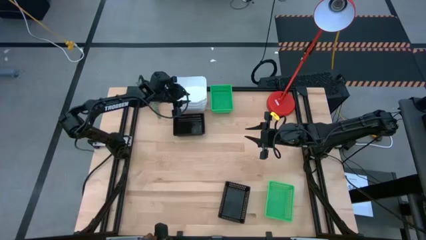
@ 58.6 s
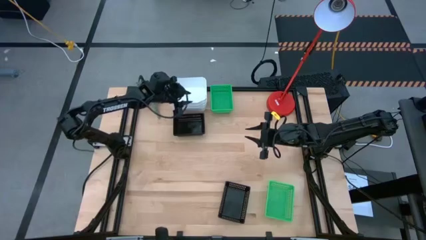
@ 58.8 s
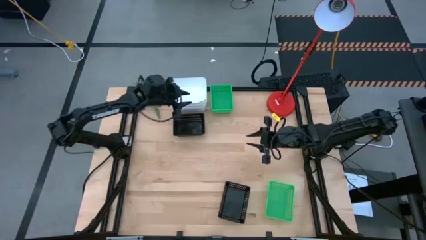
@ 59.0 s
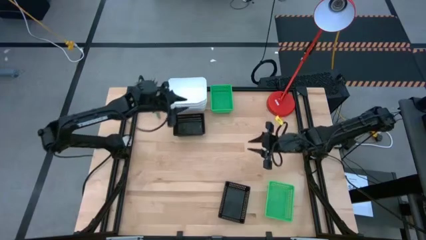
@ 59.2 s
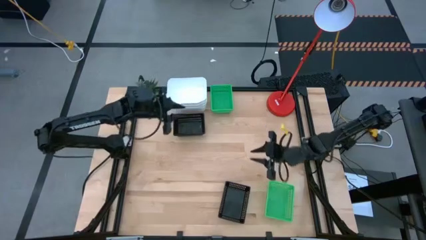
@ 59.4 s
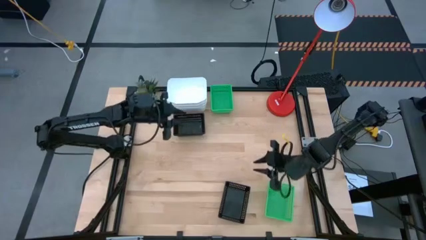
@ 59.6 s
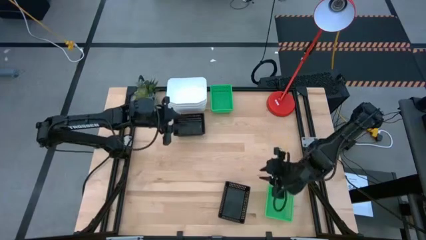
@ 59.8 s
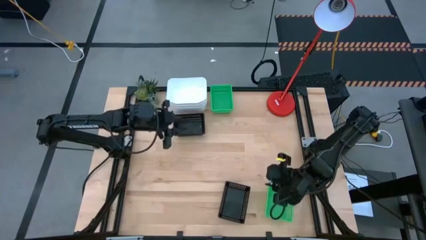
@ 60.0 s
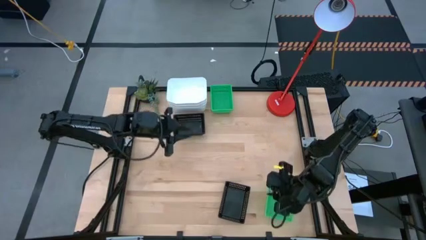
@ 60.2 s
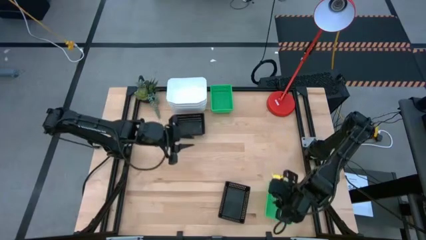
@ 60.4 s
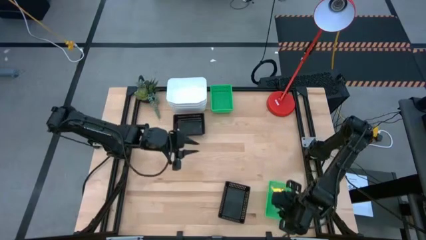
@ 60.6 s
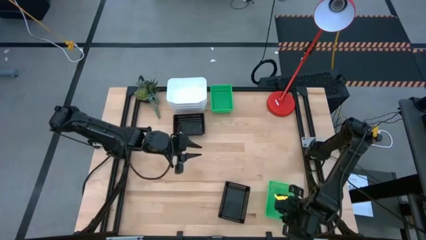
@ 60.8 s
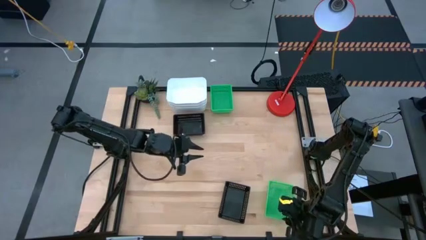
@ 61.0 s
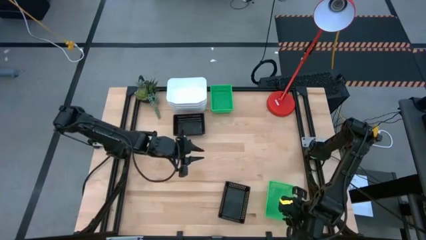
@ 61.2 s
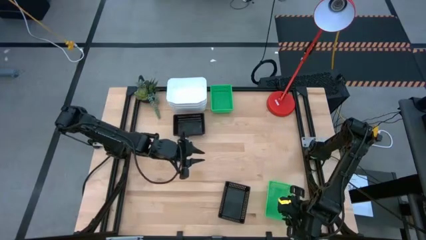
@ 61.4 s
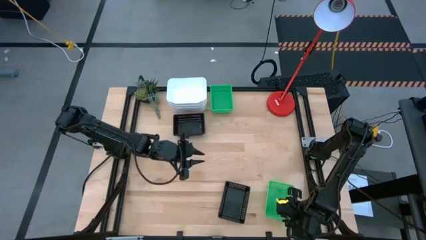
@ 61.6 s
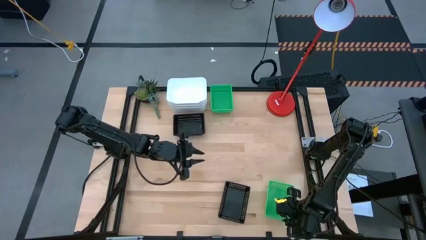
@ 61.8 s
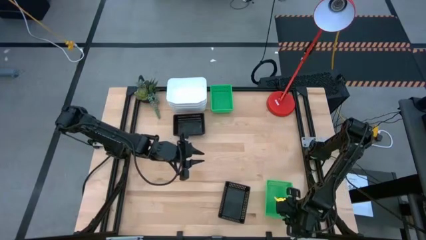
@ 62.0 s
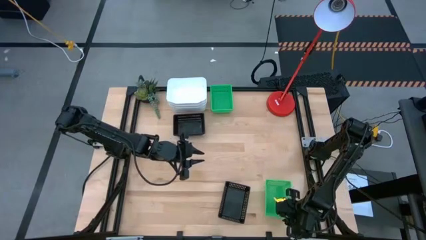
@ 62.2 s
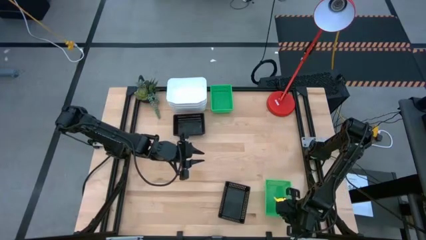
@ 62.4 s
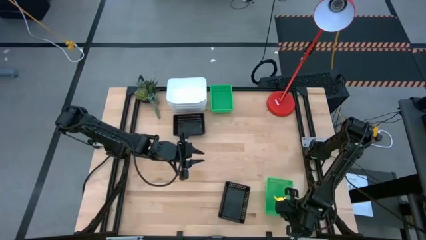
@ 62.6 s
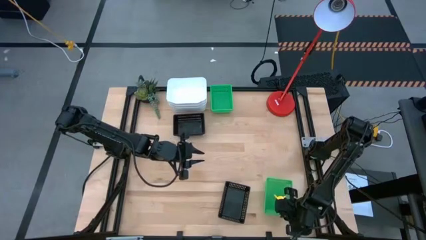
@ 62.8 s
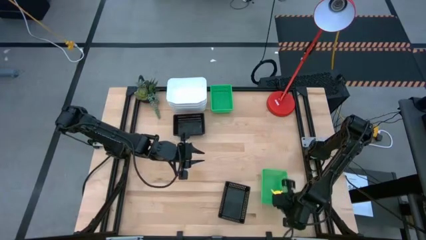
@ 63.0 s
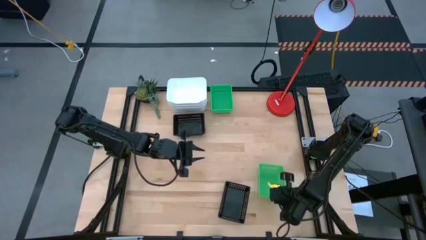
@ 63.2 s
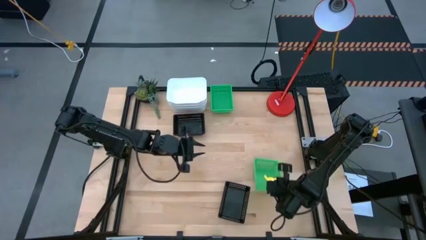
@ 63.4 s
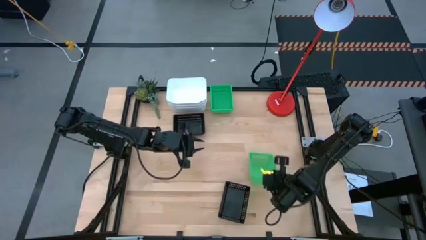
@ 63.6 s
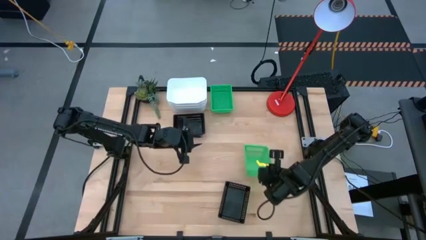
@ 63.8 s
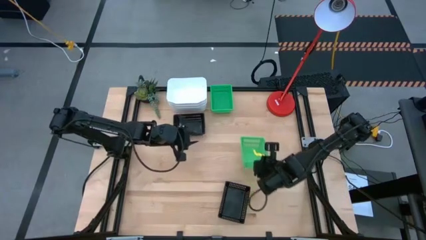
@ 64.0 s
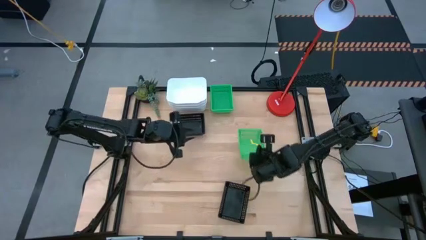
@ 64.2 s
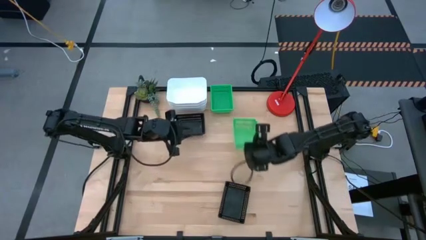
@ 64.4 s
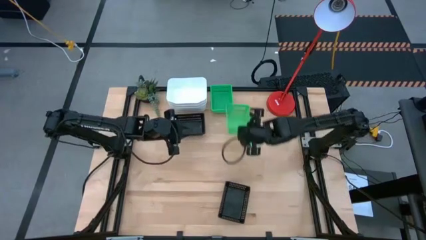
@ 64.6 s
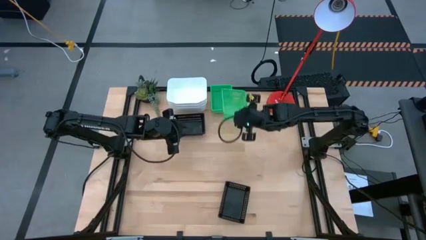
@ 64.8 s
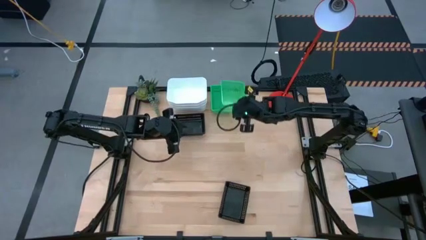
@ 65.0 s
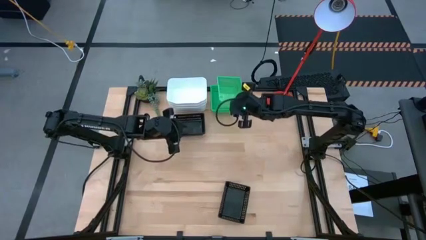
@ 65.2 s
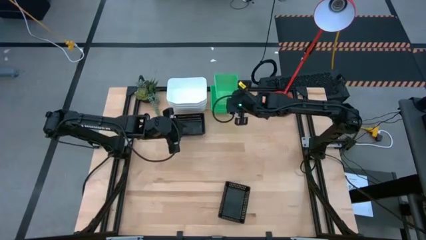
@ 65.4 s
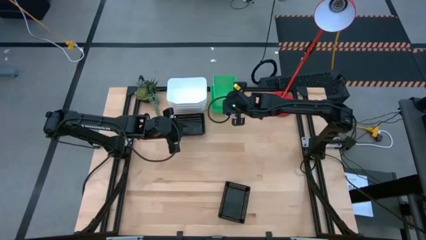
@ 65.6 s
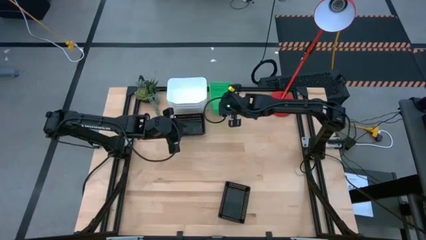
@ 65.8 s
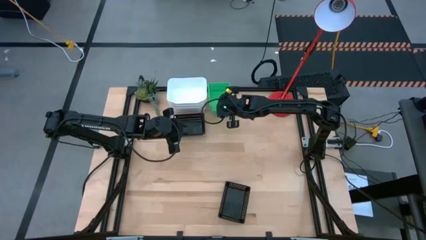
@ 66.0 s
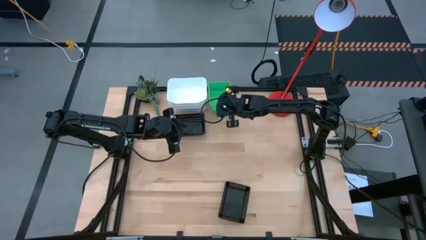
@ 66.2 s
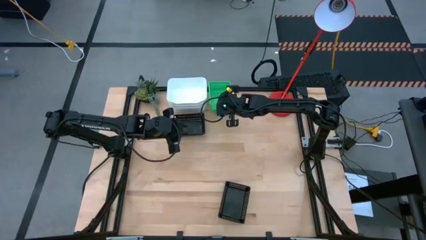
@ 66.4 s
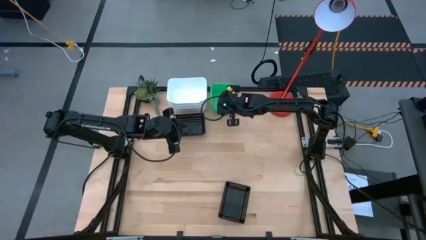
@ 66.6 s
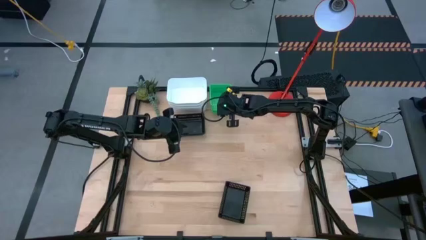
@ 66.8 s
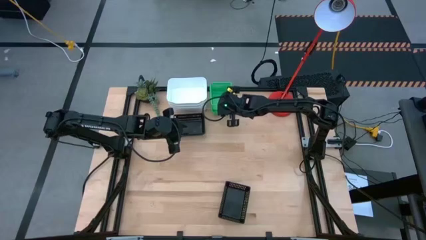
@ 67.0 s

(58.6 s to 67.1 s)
Stack the bottom green bin on top of the top green bins

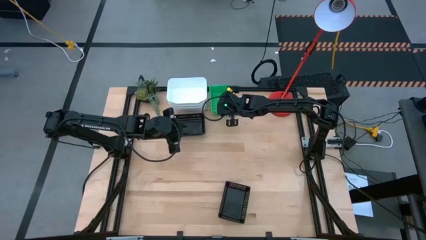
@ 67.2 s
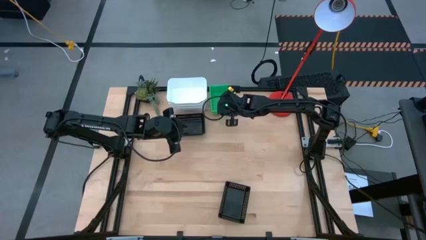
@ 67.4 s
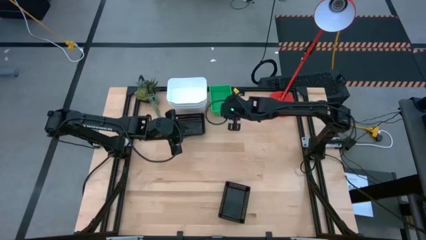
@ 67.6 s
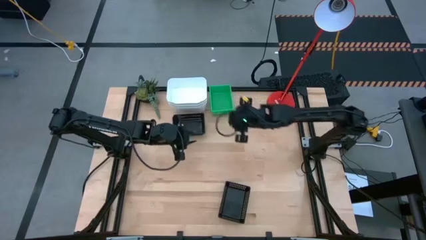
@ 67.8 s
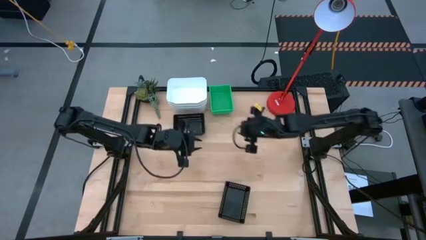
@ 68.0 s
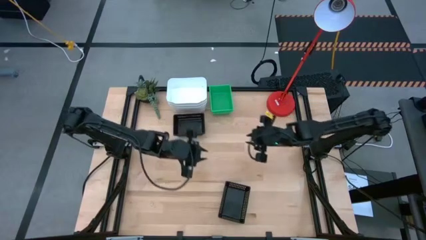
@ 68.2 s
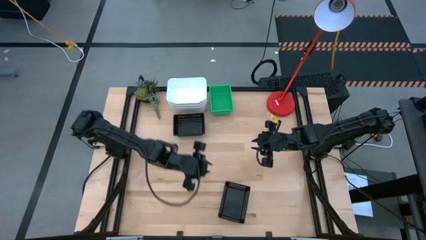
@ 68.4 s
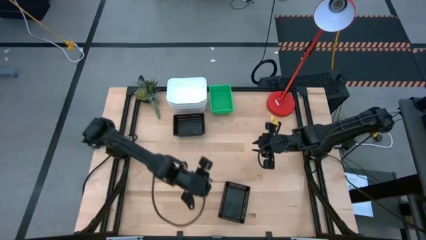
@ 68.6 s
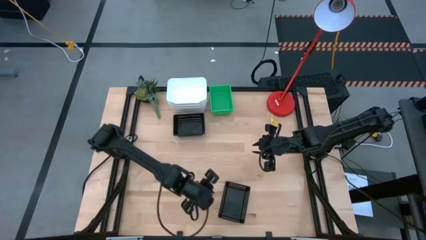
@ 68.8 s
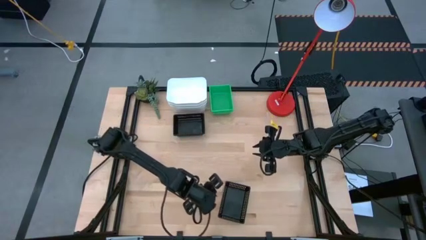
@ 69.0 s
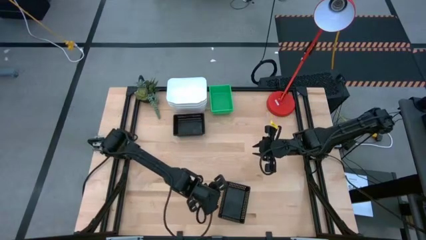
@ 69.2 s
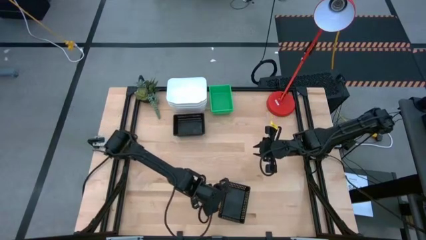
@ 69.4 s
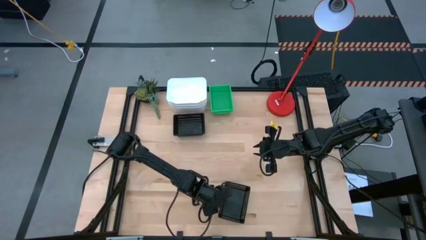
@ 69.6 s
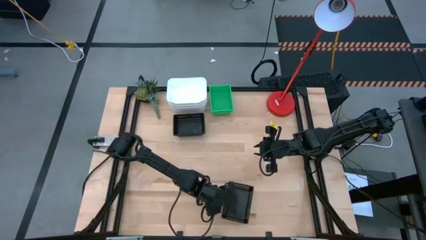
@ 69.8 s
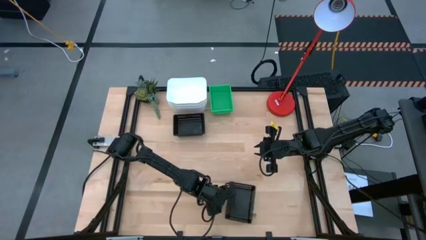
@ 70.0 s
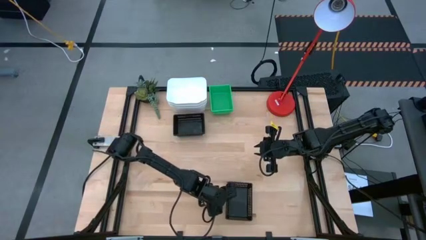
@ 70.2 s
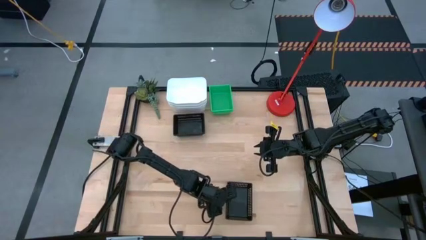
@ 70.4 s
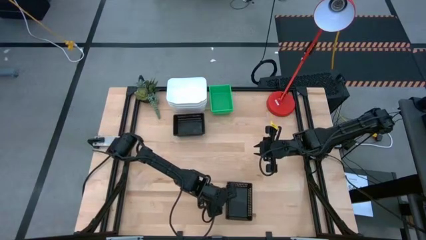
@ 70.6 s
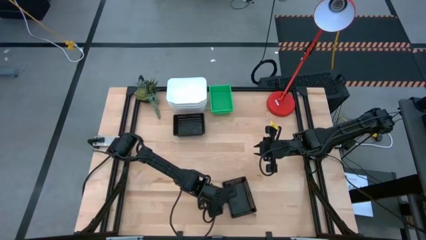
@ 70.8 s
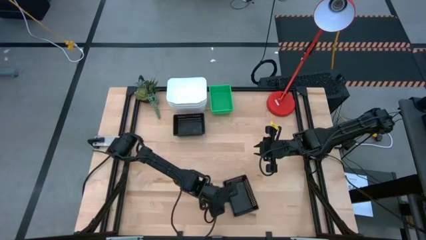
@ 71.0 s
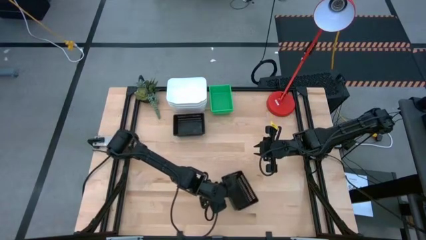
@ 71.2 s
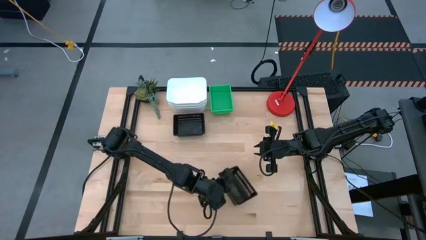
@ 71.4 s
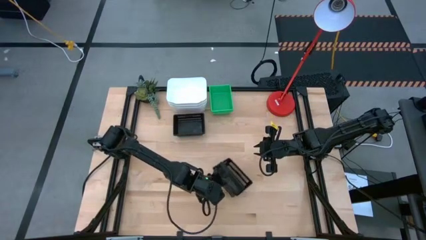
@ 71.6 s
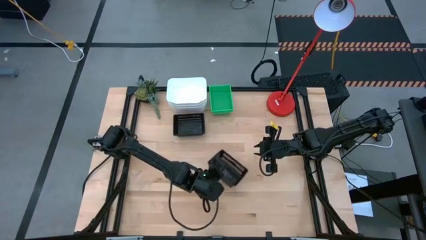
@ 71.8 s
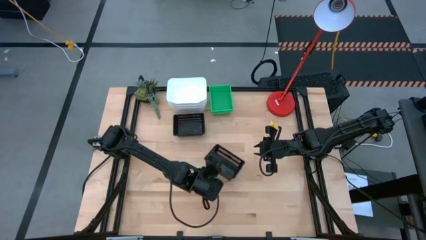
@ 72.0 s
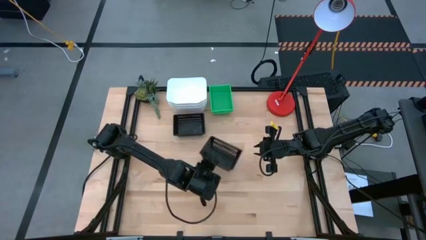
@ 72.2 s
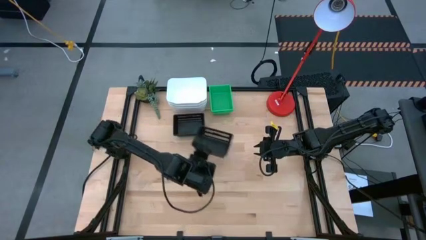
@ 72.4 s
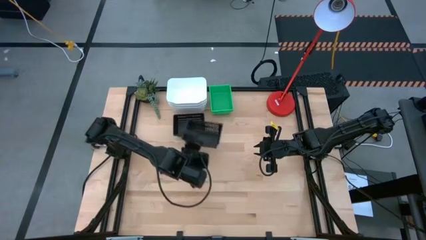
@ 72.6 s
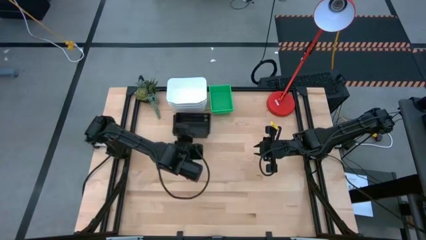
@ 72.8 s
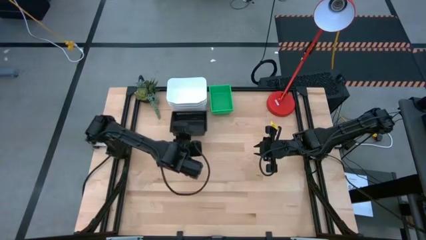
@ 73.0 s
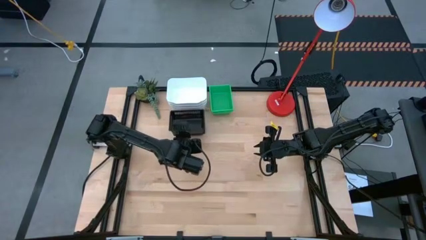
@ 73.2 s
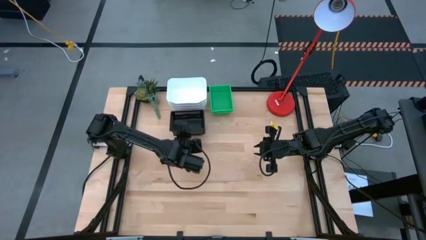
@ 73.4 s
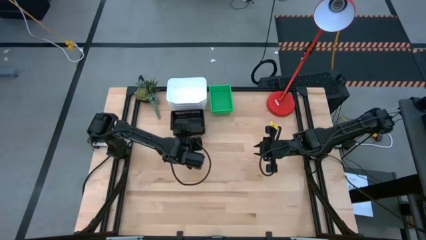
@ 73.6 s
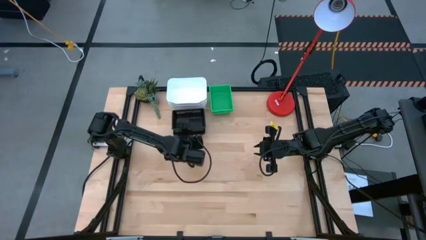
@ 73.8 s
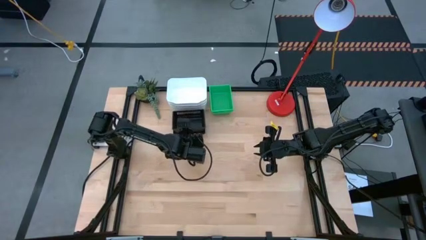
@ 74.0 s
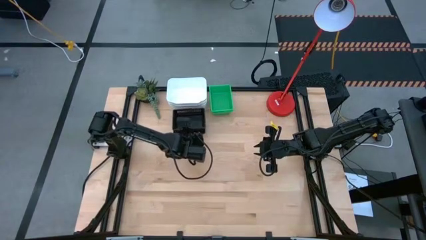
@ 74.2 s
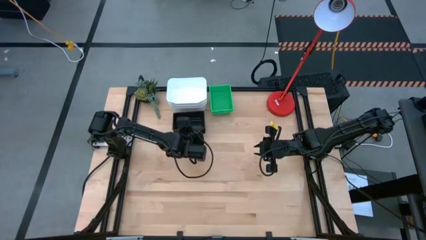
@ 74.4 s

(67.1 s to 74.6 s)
Stack the bottom black bin on top of the top black bins
